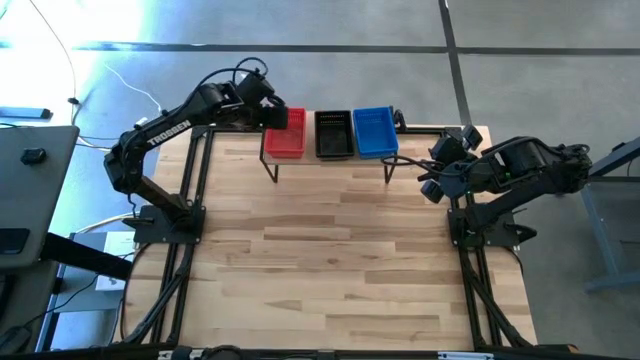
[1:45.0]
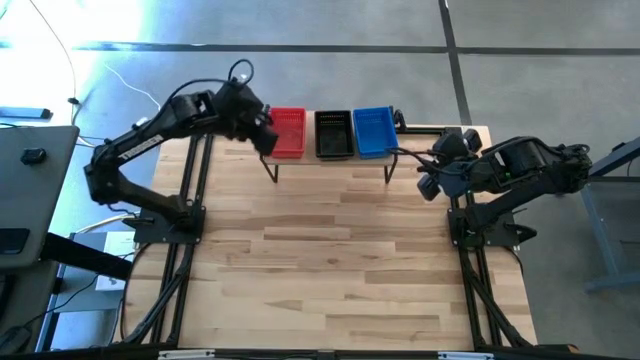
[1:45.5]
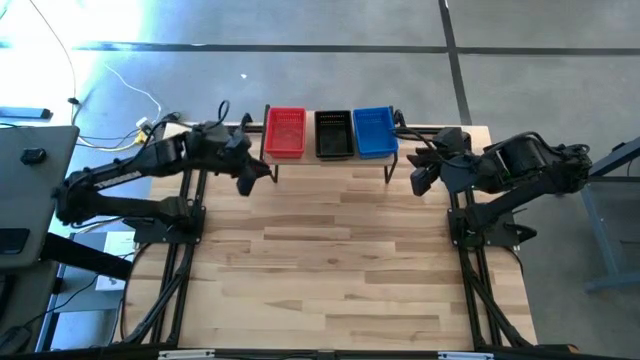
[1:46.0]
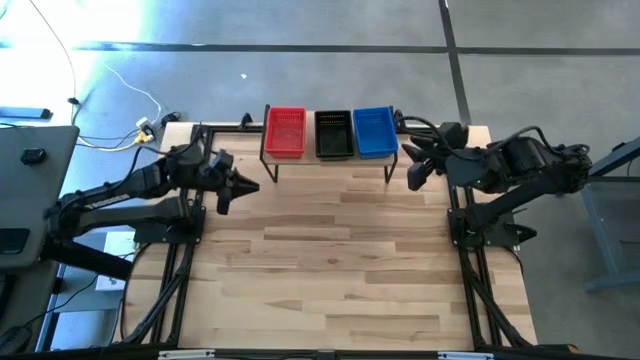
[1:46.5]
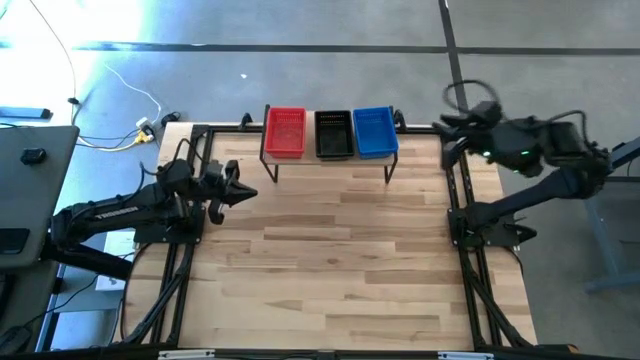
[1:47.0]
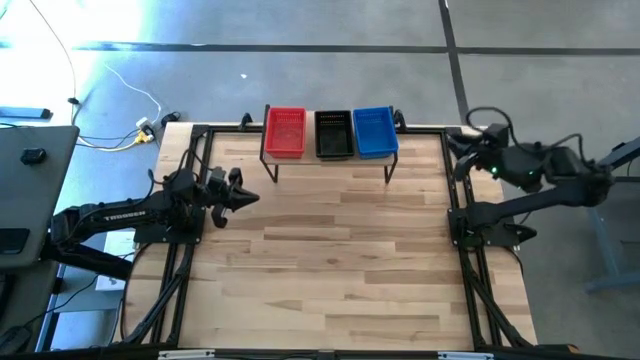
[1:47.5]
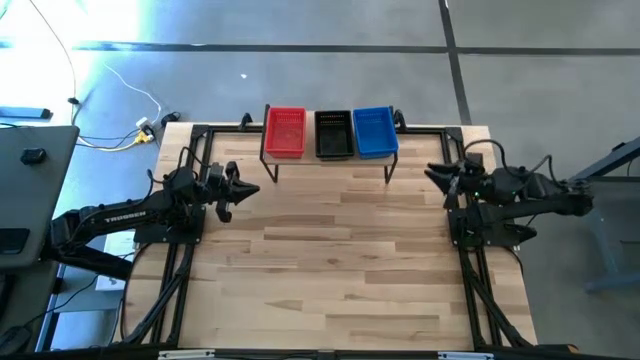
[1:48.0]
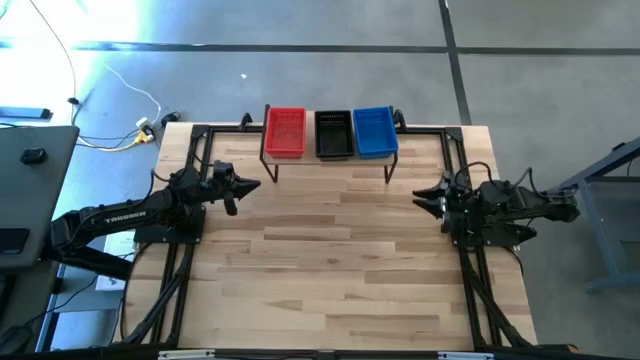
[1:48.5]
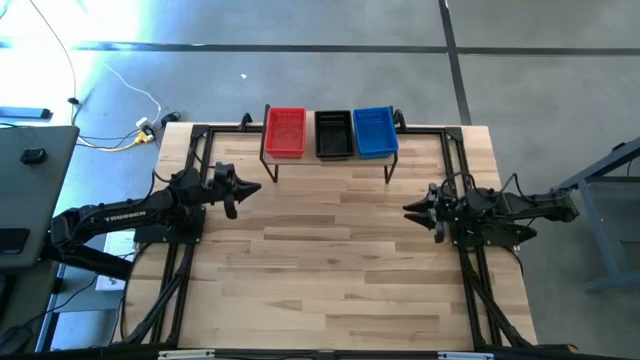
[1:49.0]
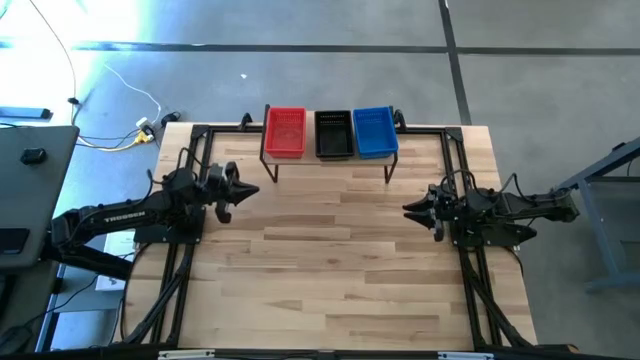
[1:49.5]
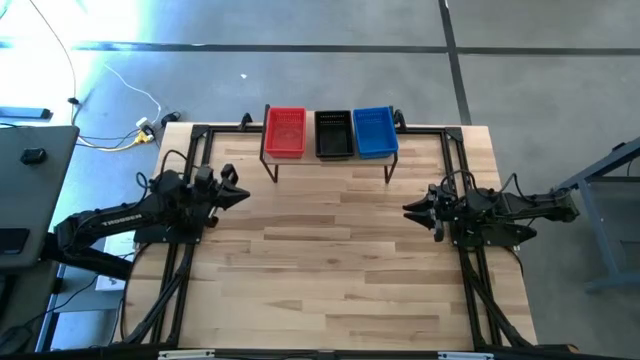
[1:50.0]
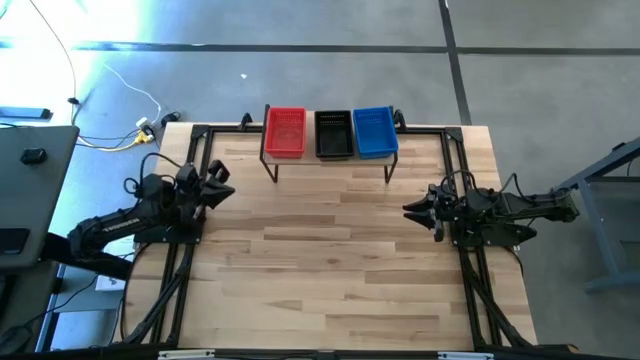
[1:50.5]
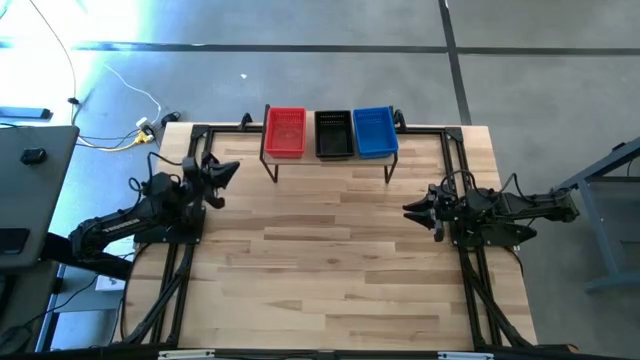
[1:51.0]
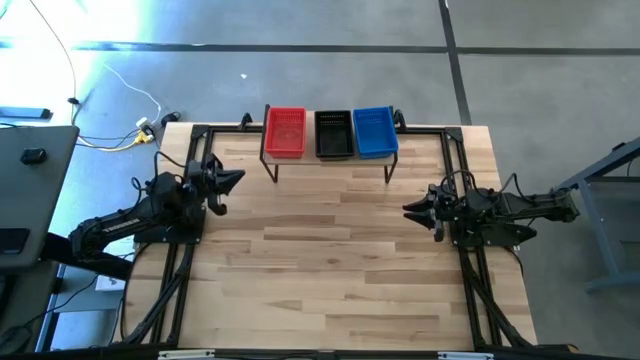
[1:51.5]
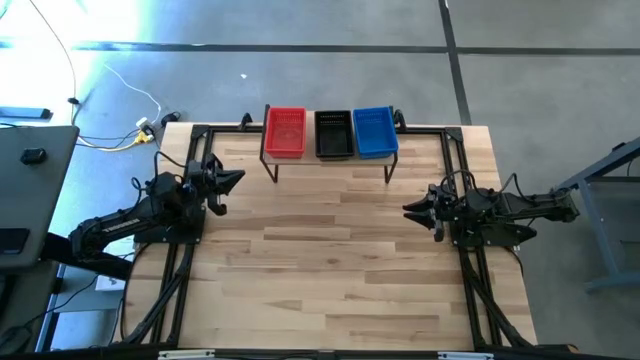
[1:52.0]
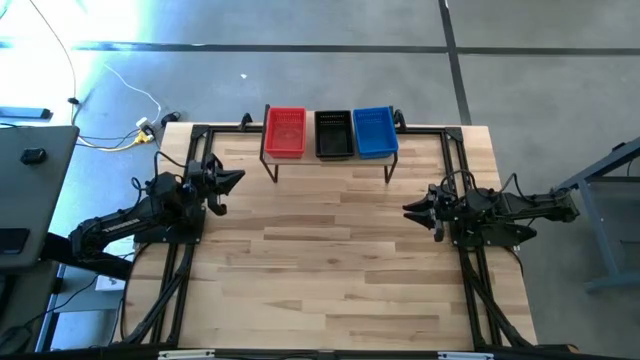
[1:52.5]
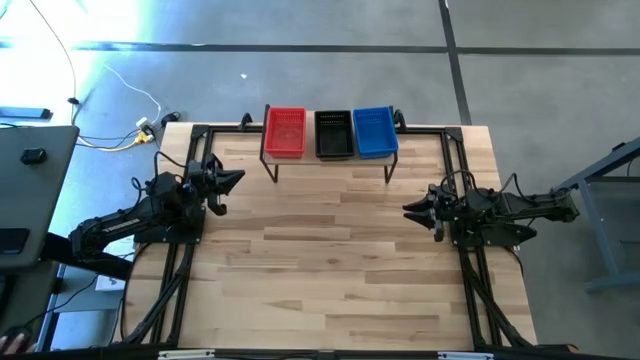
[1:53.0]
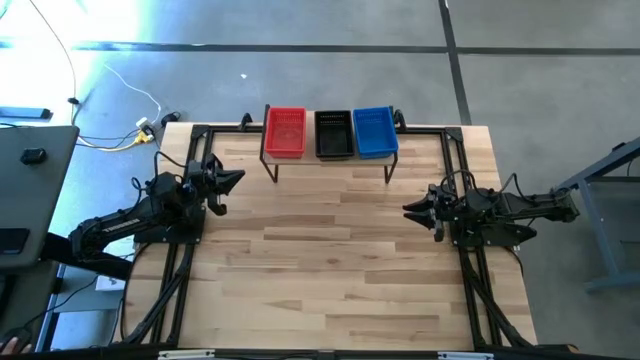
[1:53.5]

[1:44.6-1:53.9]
Task: Stack baskets on shelf by color
Return to Home Position

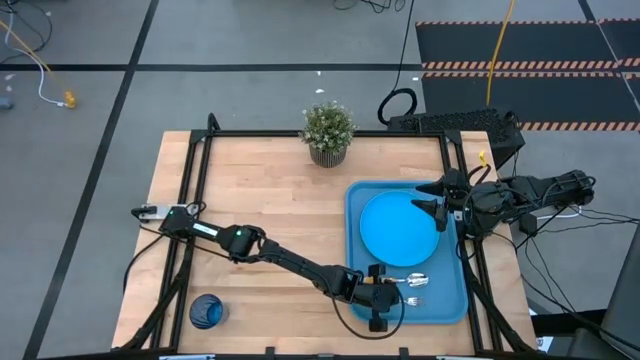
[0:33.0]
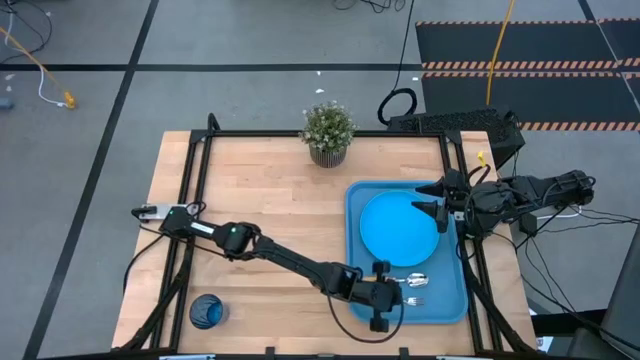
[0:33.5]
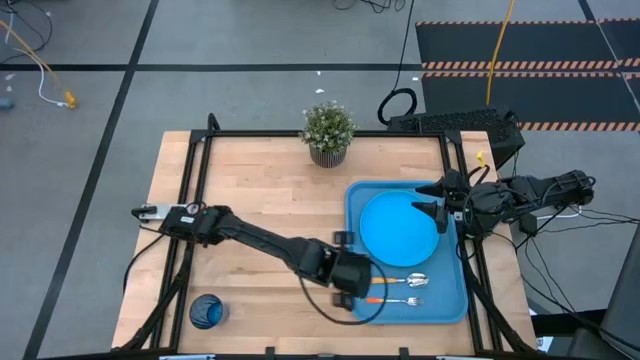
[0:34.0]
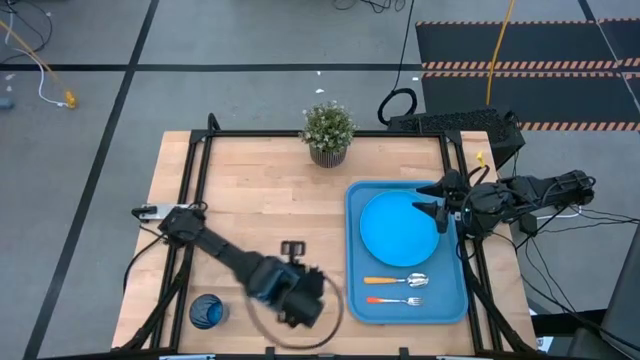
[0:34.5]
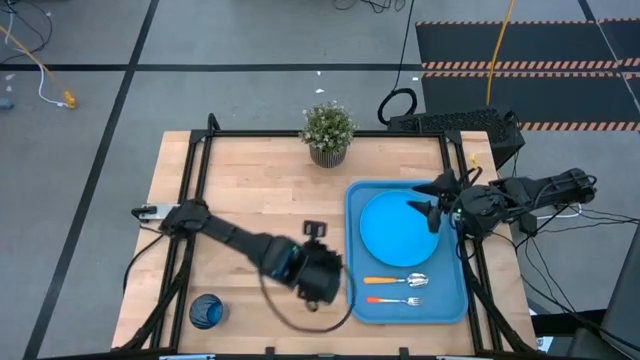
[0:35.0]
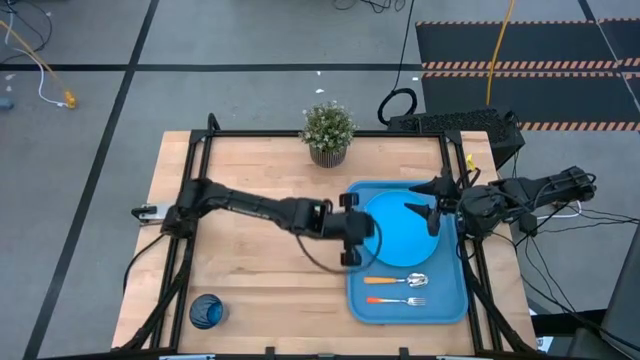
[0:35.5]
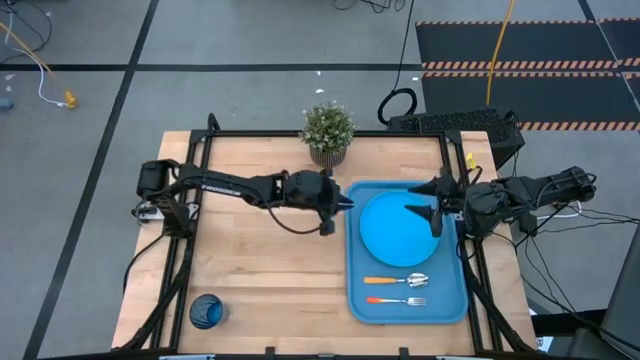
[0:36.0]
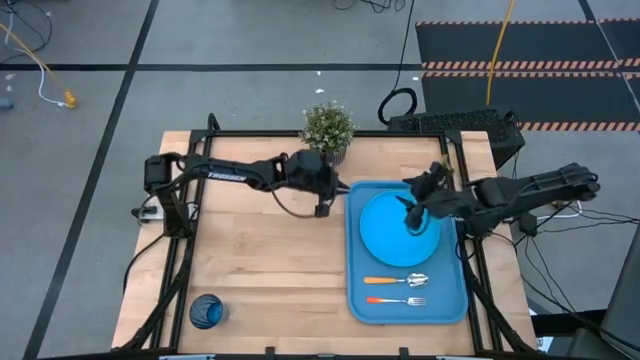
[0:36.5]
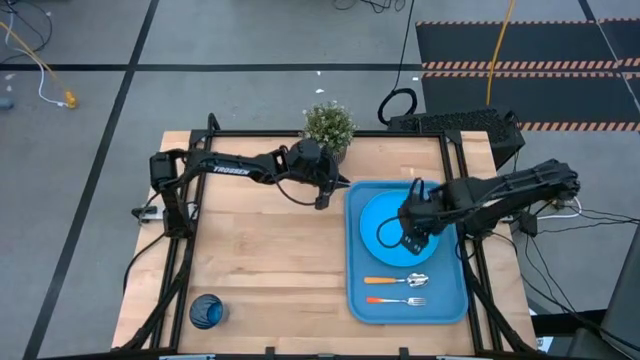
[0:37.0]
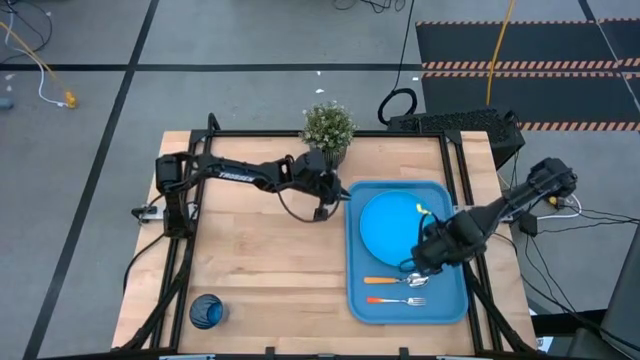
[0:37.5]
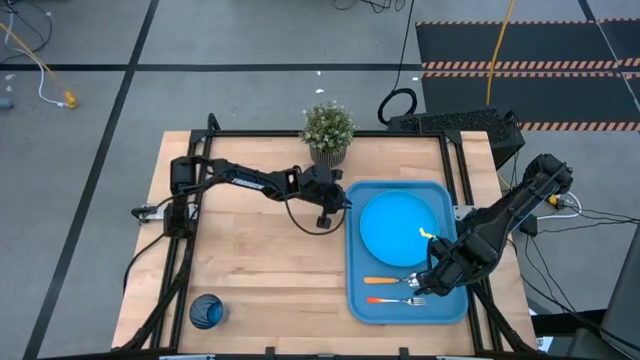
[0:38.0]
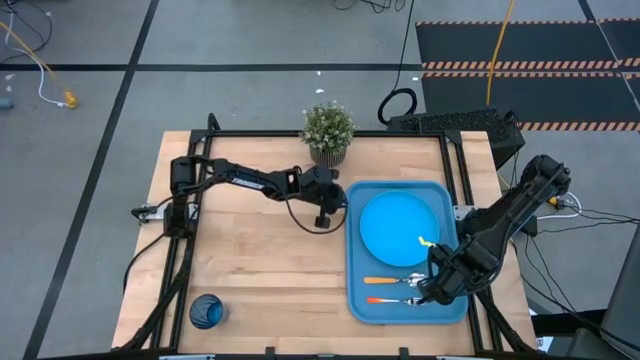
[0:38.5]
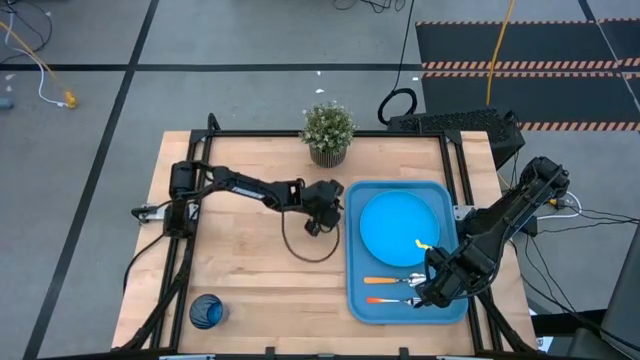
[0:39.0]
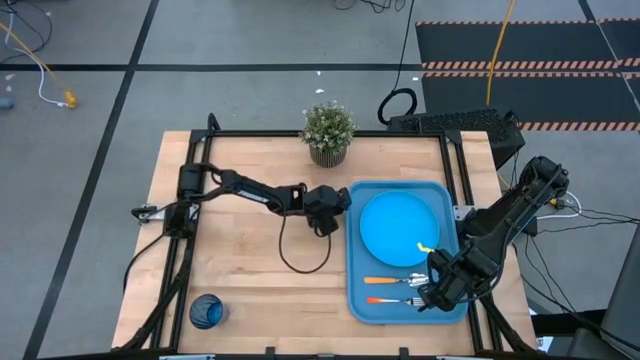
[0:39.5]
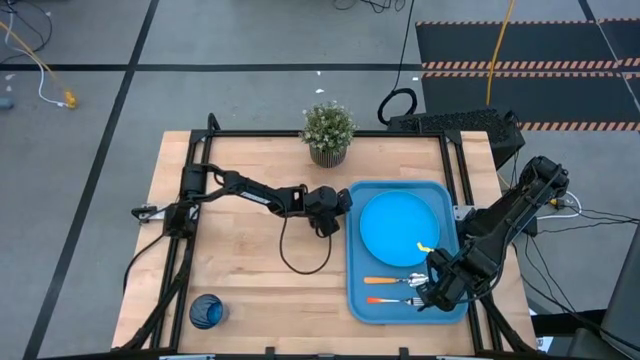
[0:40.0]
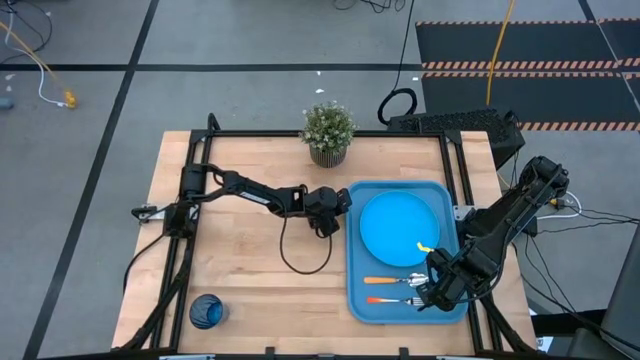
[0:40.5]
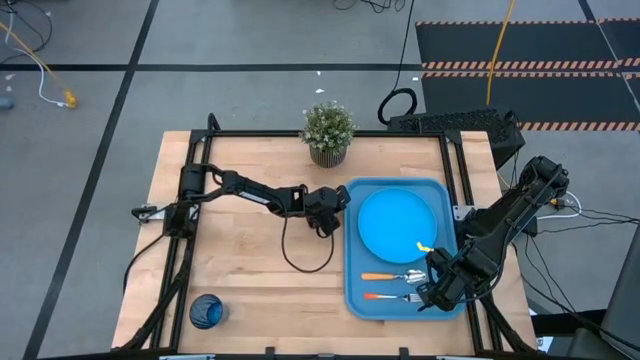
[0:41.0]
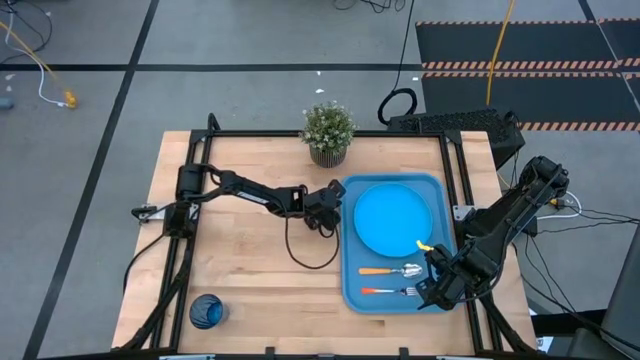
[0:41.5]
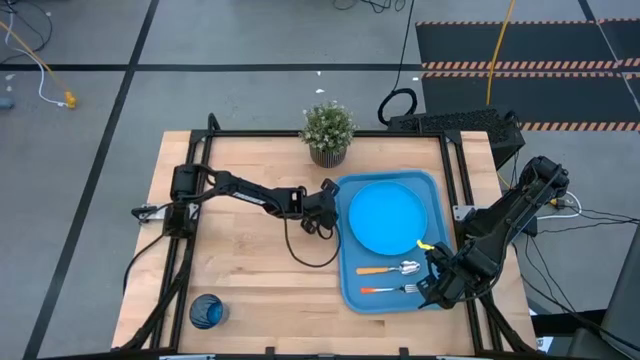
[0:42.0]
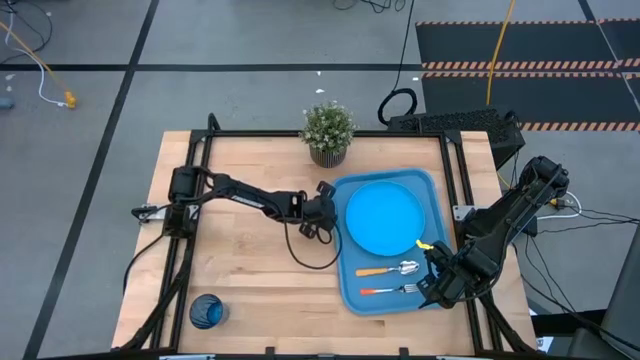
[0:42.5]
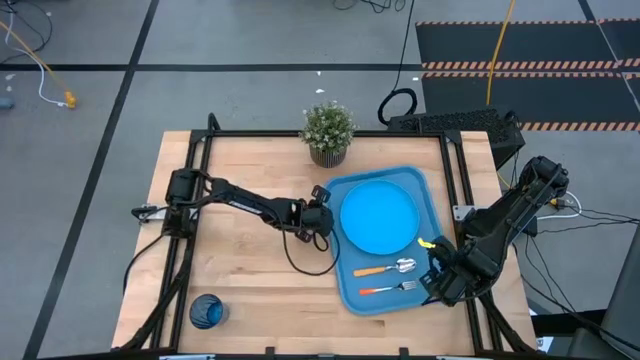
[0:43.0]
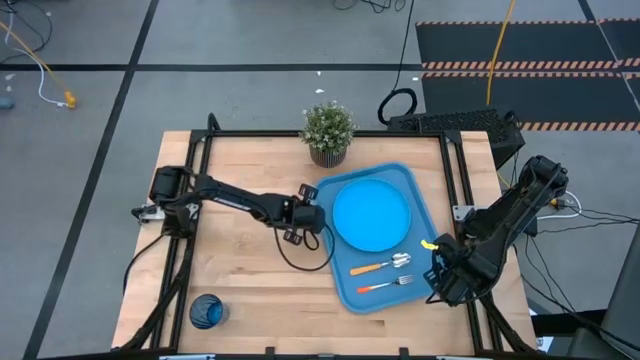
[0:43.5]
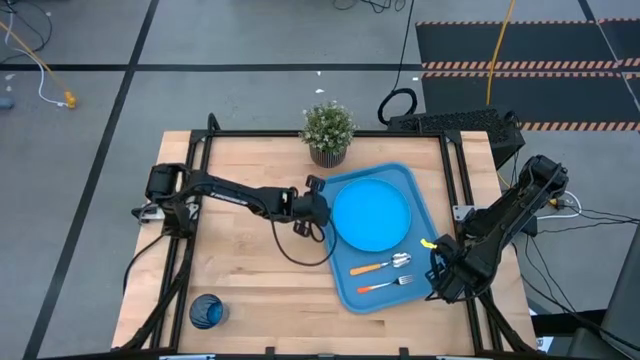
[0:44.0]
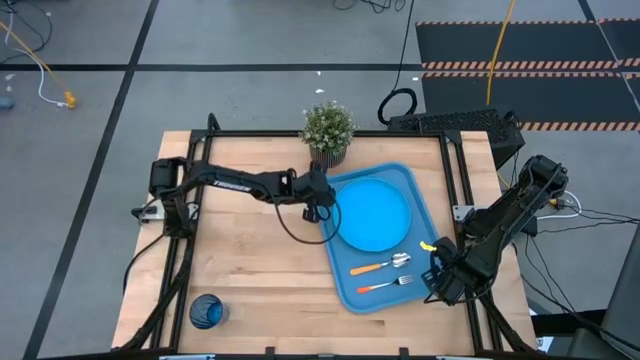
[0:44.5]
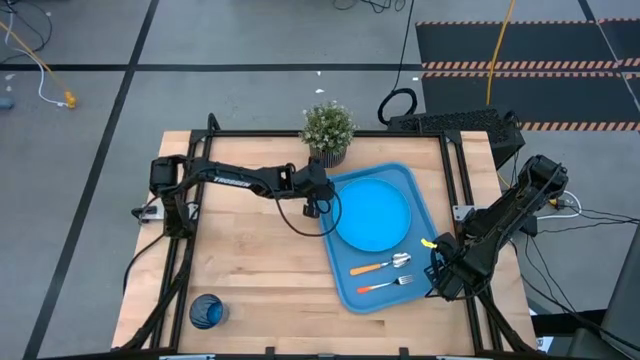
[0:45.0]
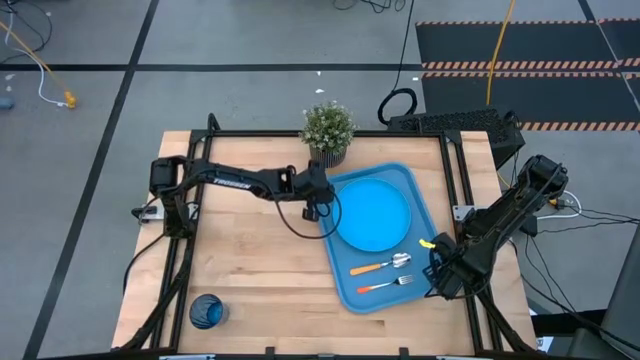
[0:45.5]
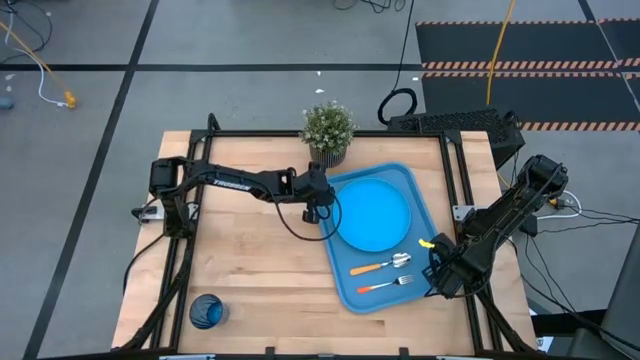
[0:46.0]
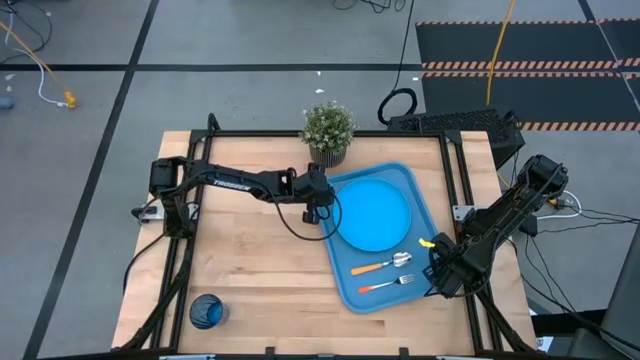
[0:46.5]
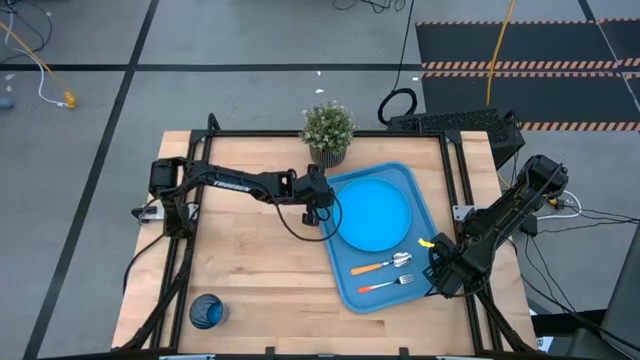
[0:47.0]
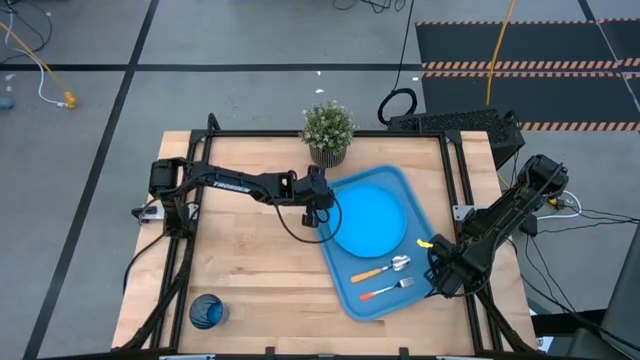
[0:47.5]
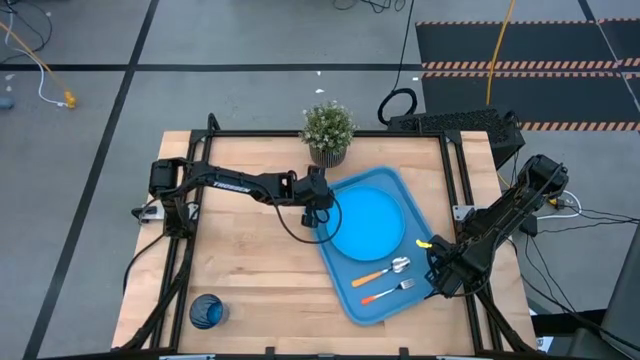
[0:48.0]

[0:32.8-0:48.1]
Task: Pick and place plate/cup/fork/spoon on tray
Move the blue tray to the center of the table
